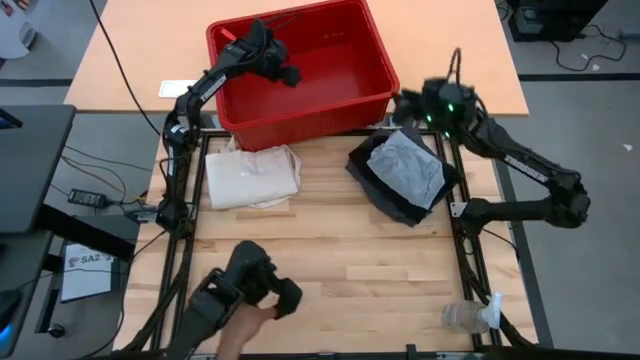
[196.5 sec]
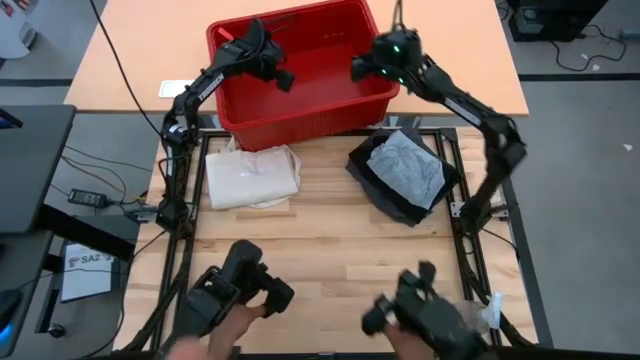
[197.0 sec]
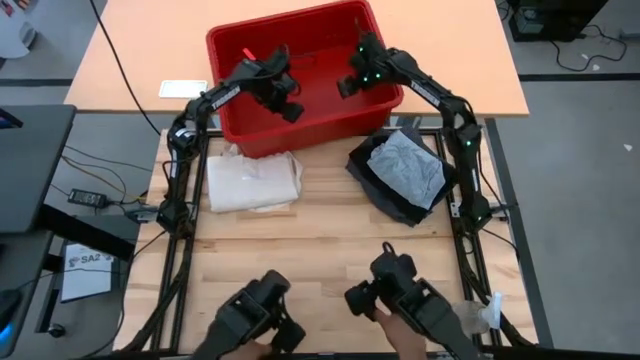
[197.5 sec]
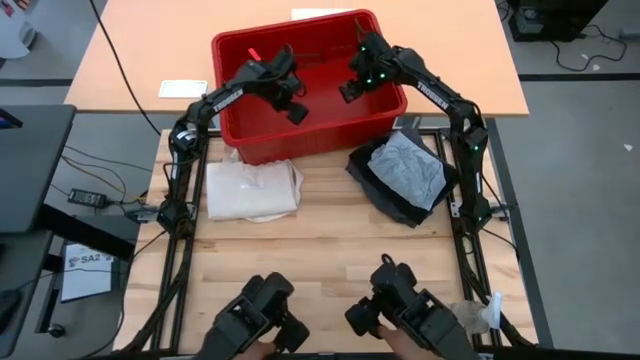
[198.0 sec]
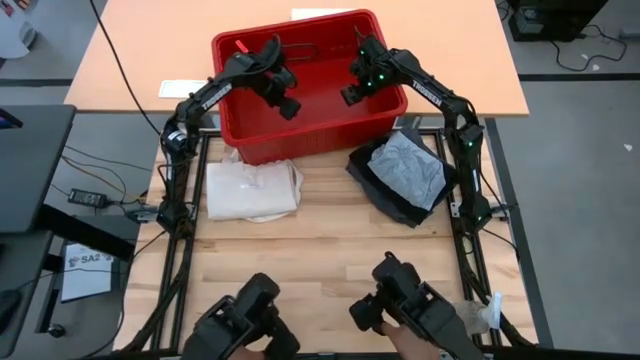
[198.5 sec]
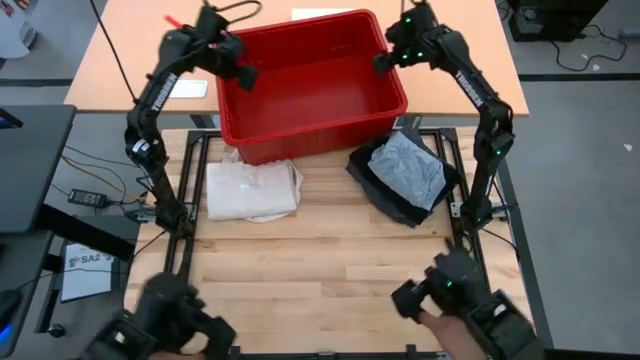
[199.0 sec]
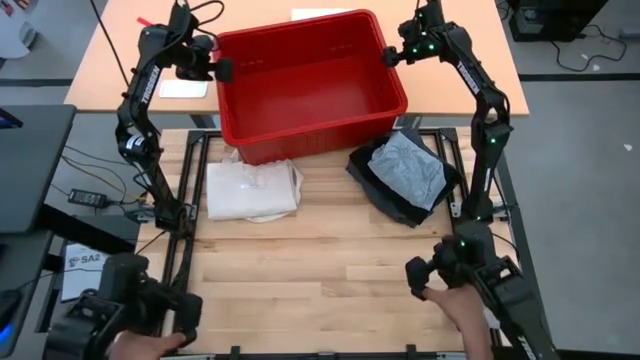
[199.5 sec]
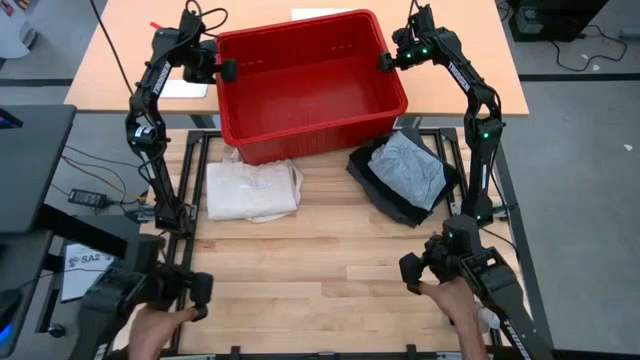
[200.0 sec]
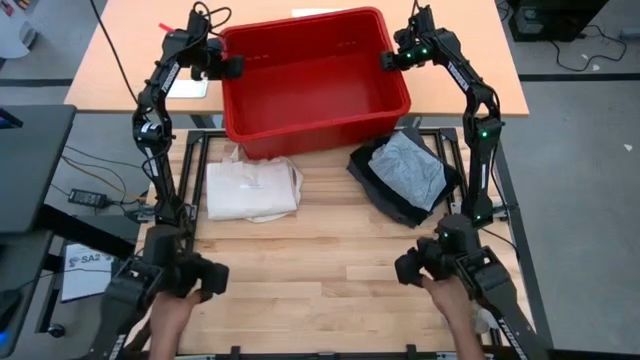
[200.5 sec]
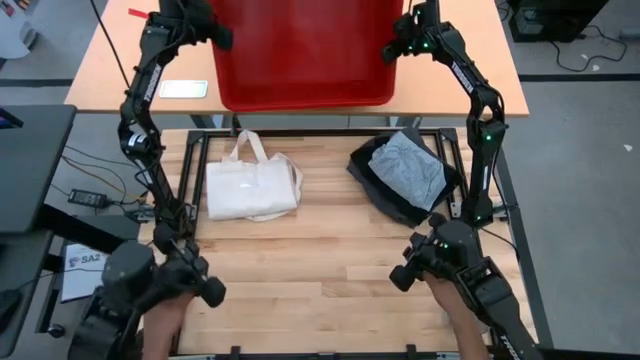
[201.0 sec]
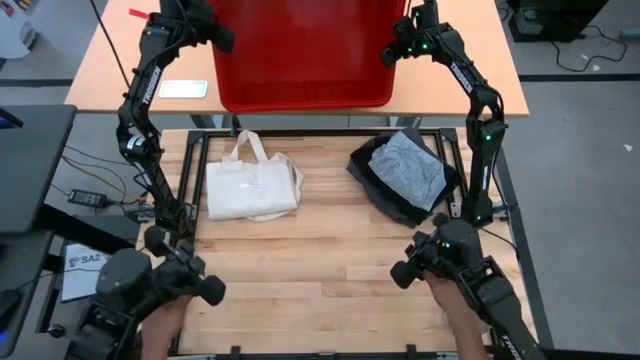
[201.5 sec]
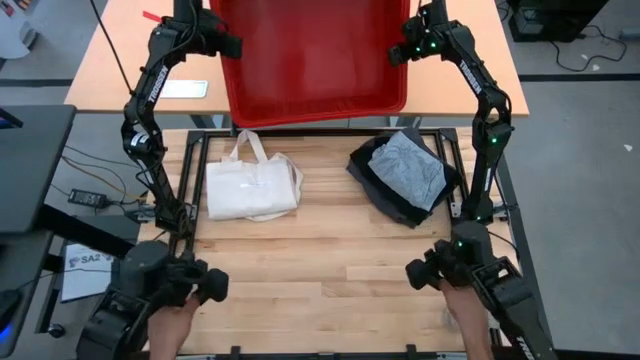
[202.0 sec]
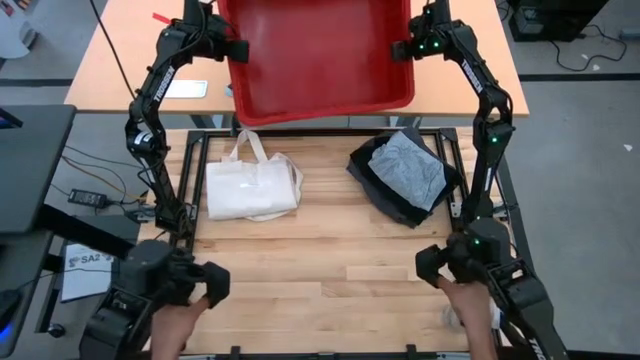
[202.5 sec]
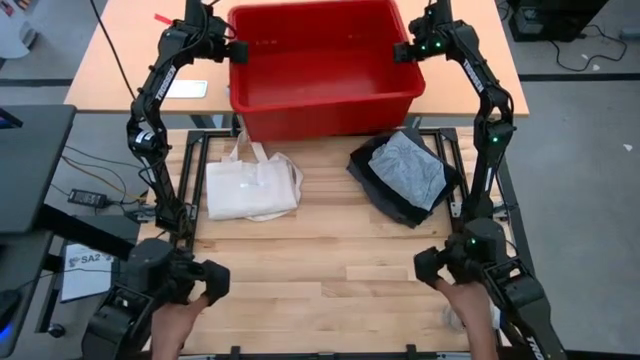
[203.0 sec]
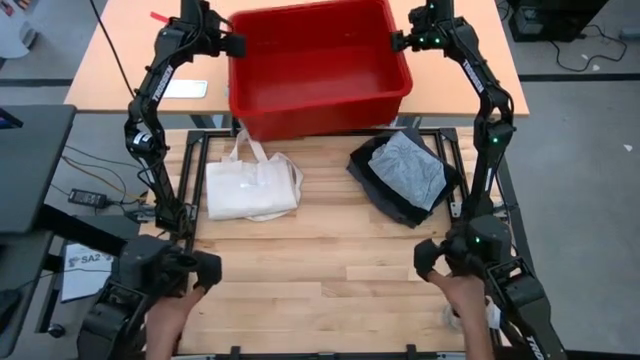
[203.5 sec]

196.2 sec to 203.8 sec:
Task: Fold laundry
Move the red bin to the other table

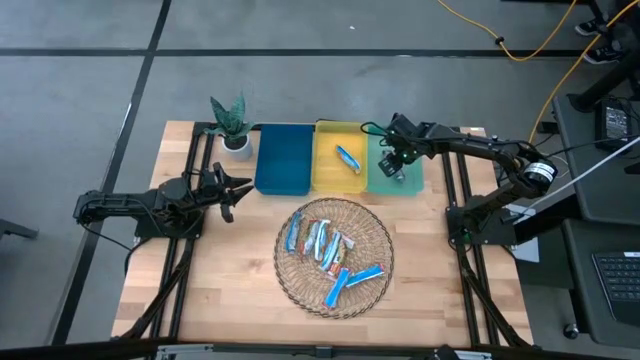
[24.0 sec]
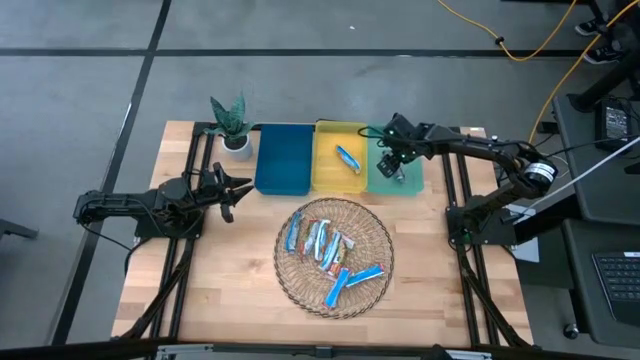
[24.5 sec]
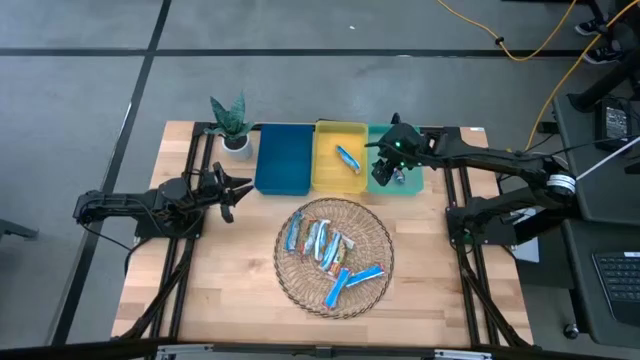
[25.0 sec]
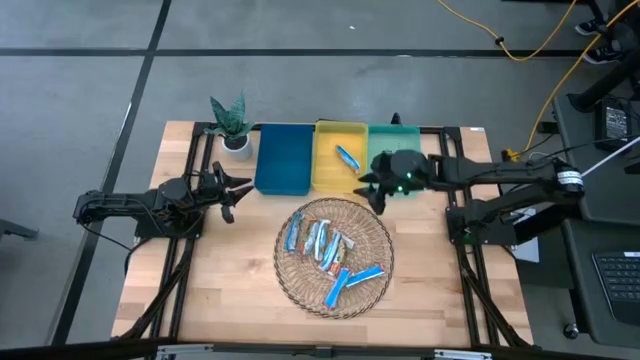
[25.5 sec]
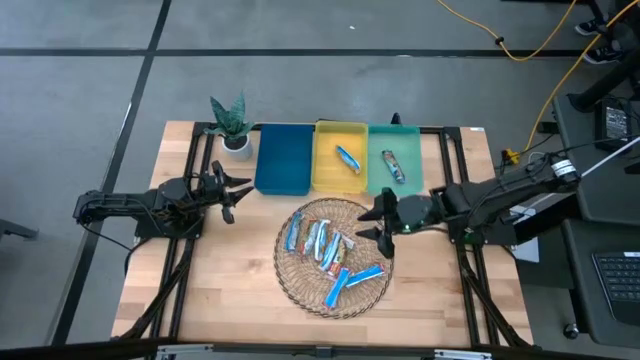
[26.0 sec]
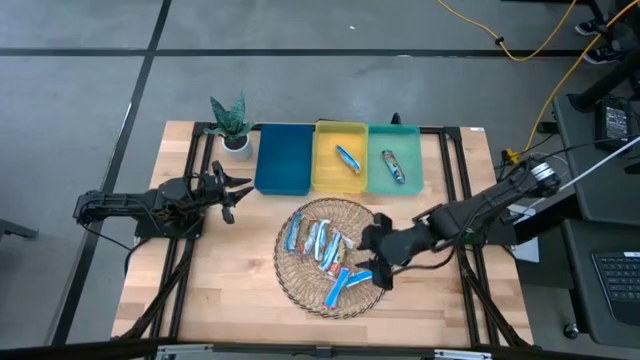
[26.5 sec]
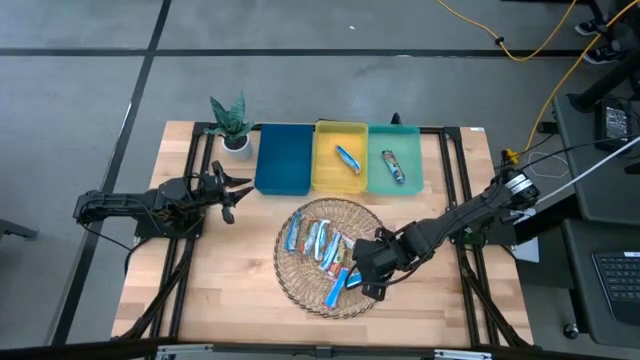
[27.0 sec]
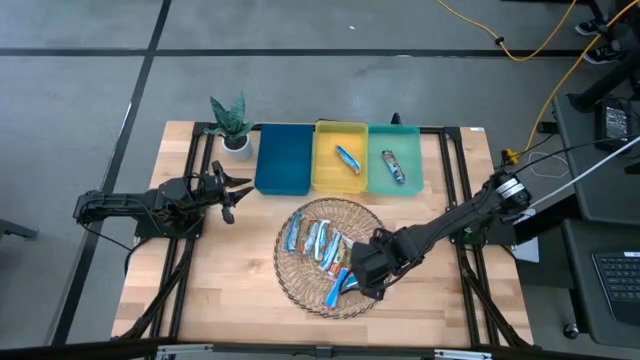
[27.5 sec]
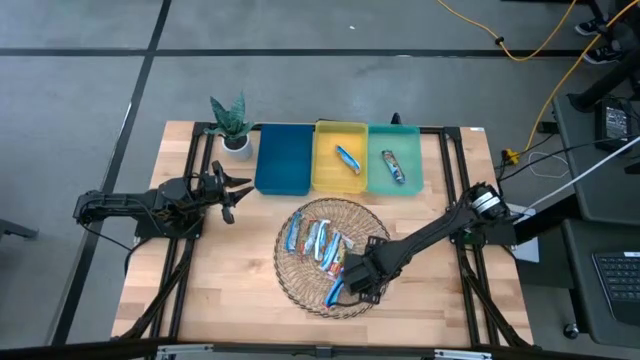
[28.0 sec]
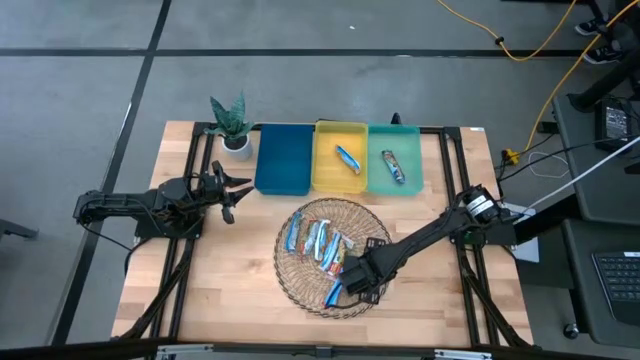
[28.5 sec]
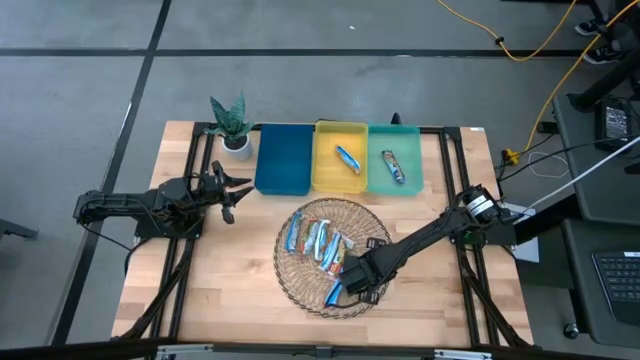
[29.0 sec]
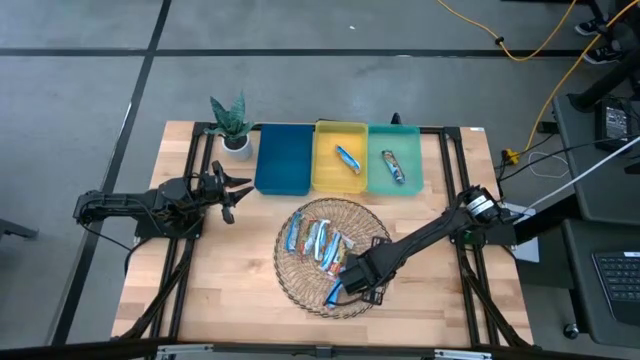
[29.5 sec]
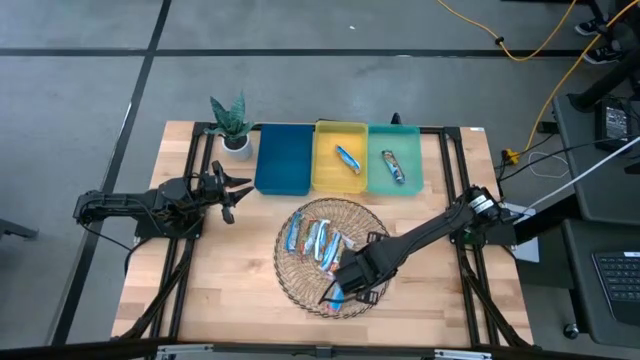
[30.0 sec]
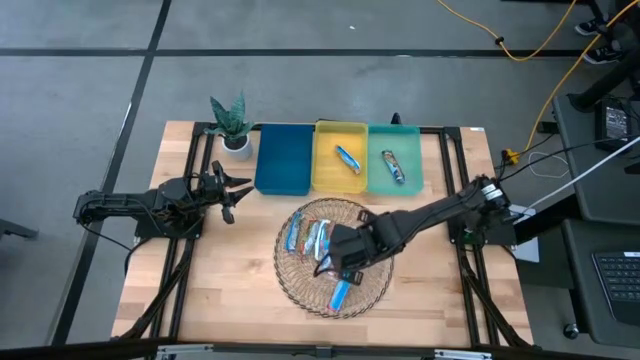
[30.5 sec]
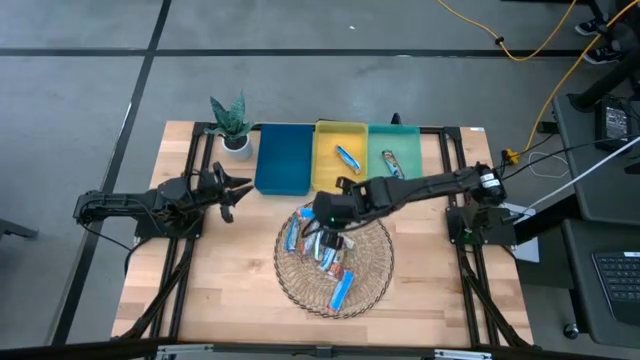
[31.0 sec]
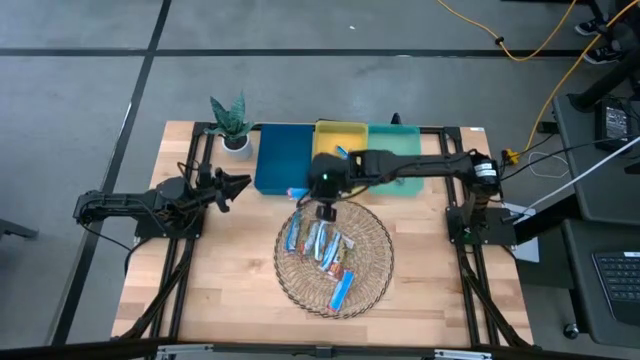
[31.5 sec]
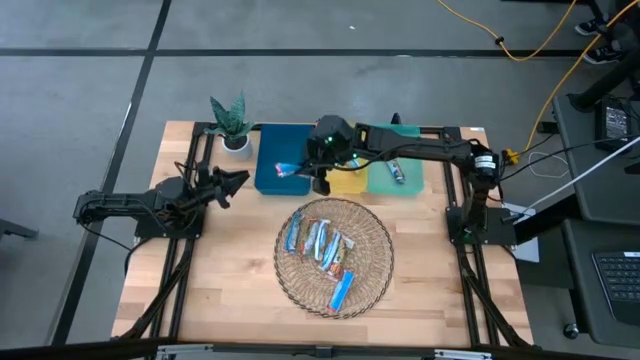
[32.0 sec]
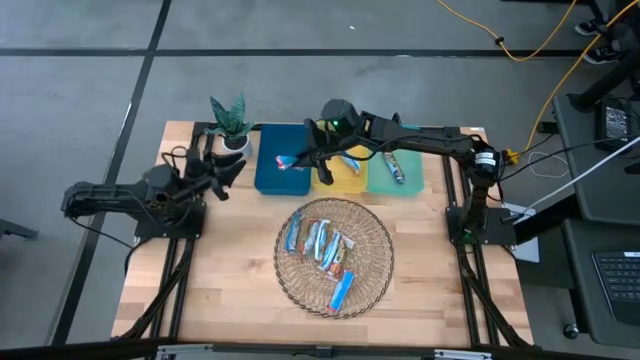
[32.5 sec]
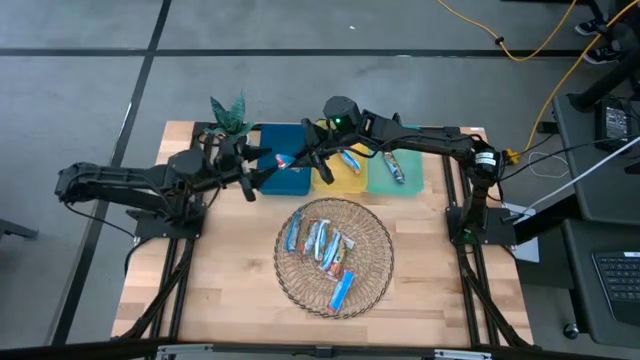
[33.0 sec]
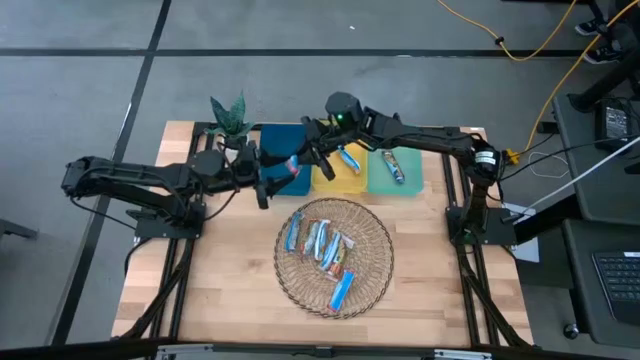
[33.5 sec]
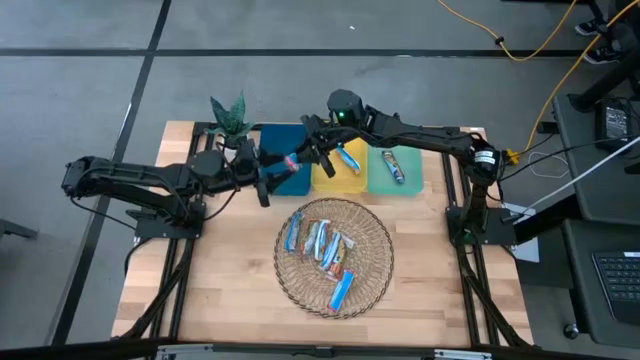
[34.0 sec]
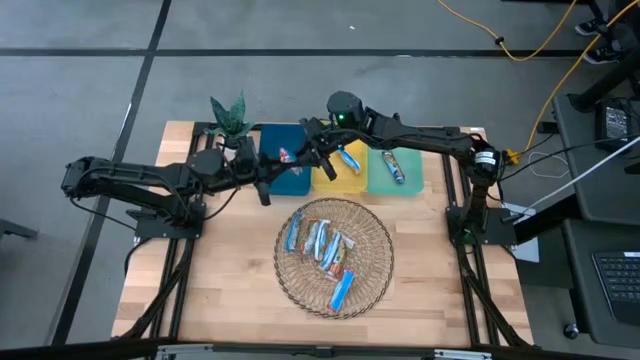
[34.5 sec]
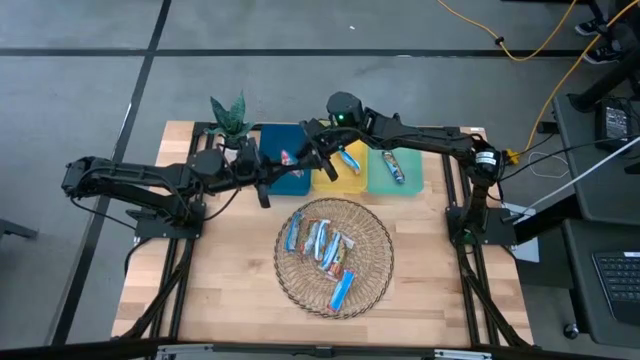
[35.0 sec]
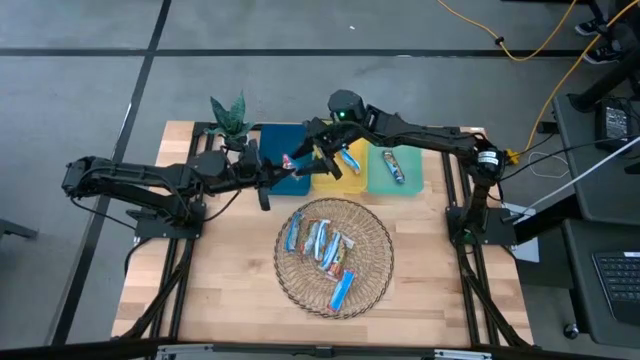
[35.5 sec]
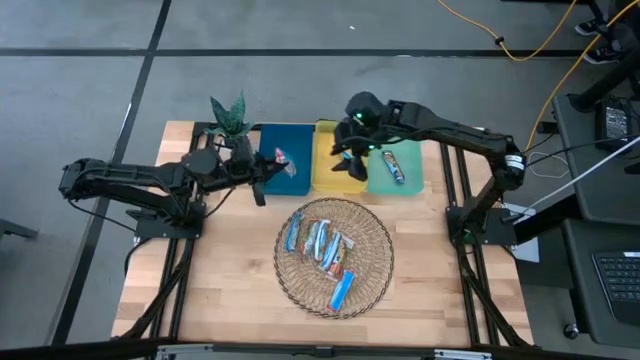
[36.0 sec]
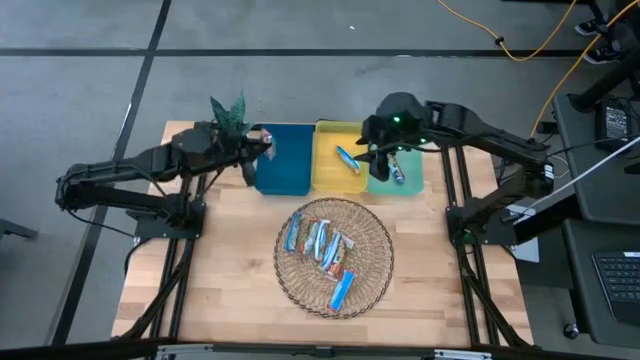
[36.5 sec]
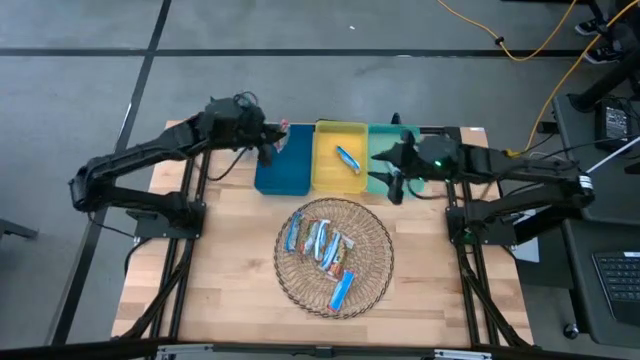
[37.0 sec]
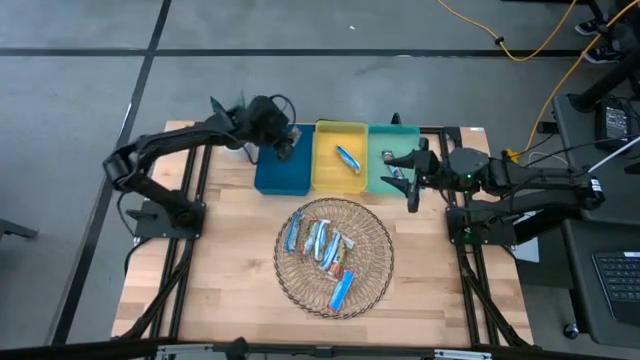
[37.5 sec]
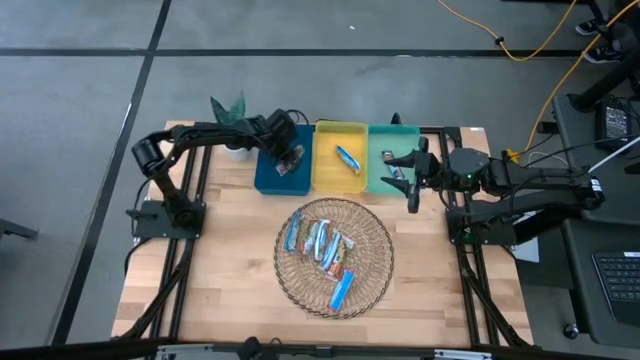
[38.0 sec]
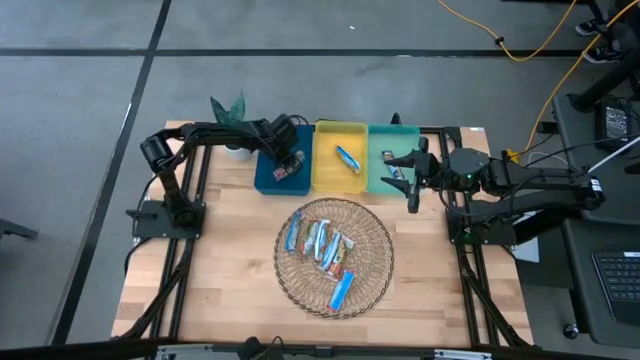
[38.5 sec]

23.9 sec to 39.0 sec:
Task: Pick and place Granola Bars by type
Put the red granola bar into the blue bin
